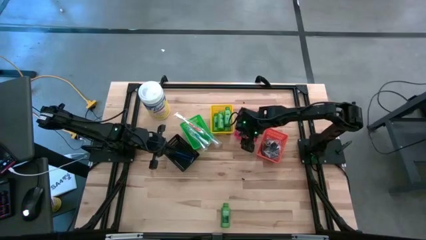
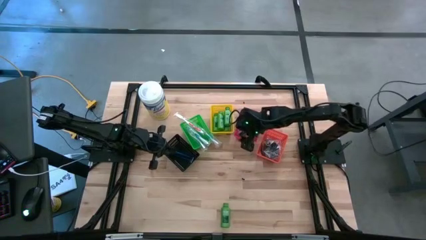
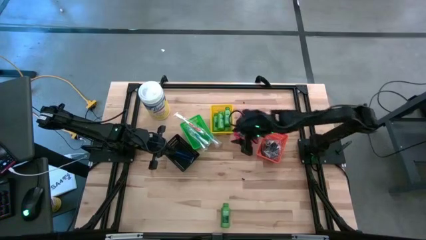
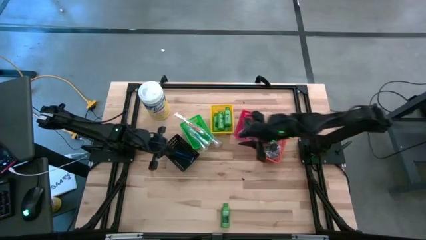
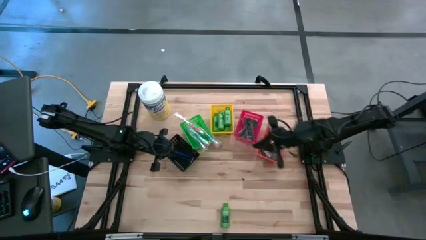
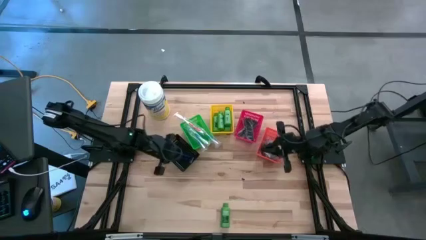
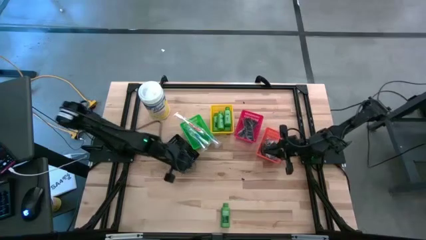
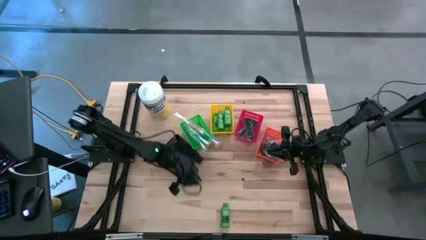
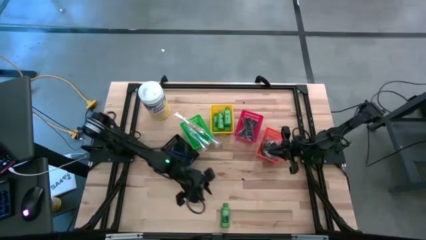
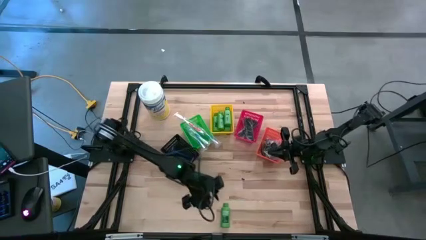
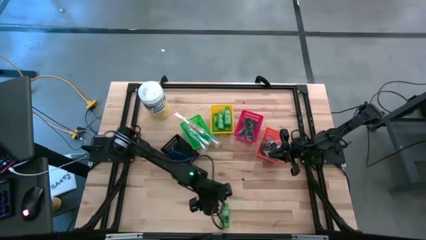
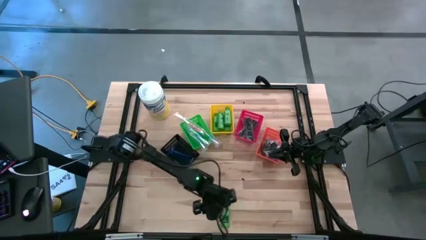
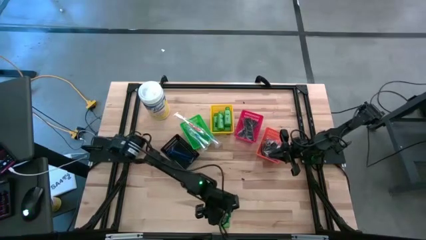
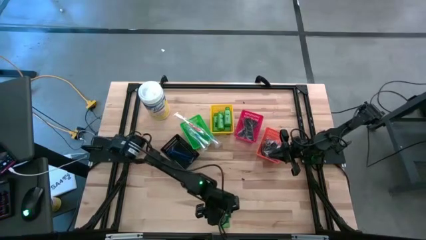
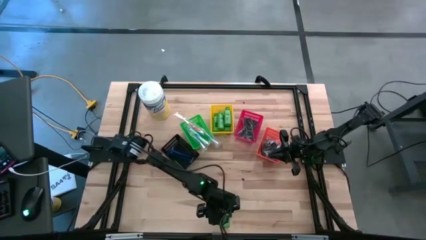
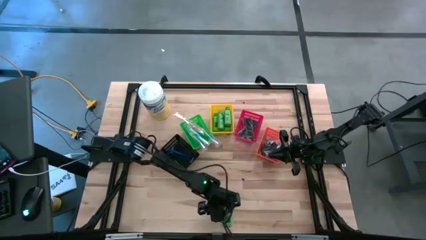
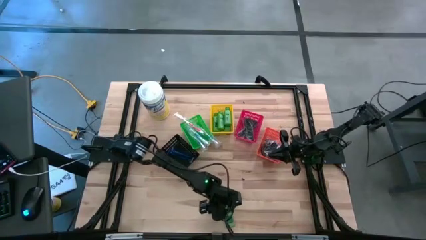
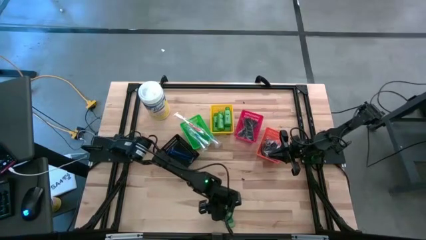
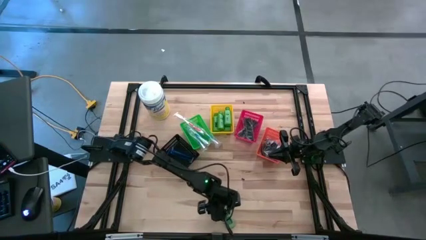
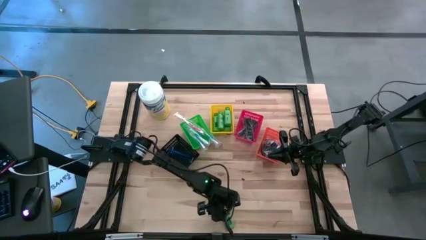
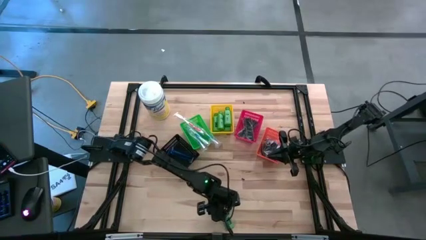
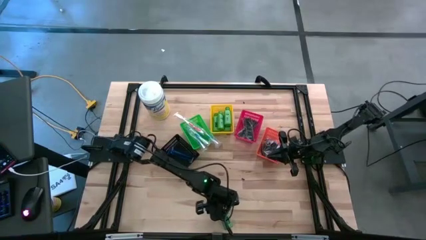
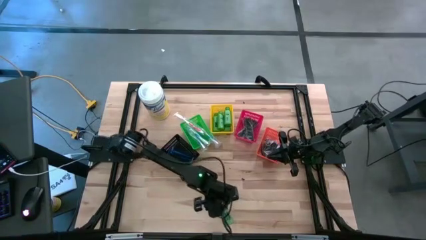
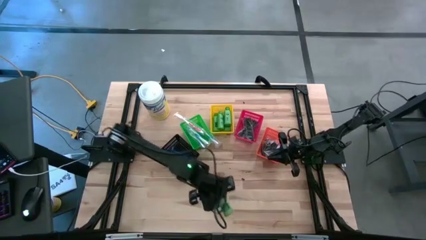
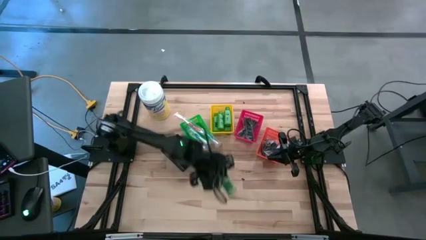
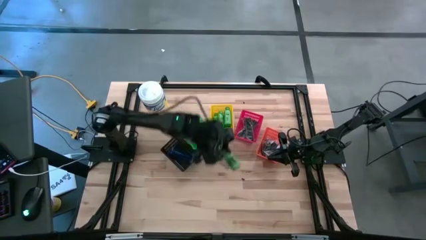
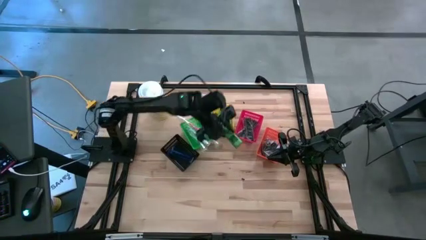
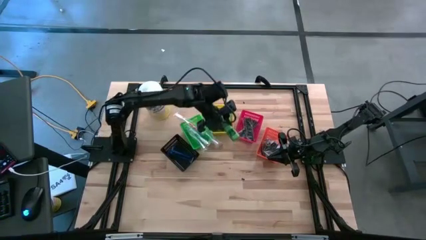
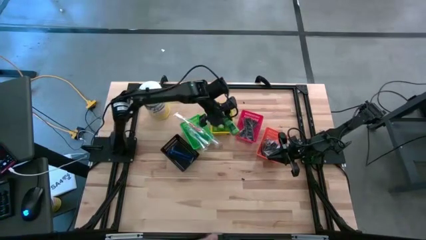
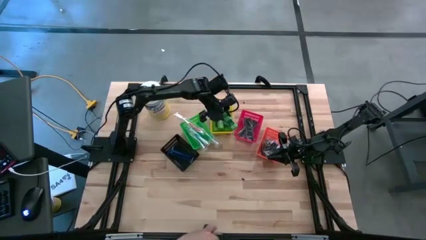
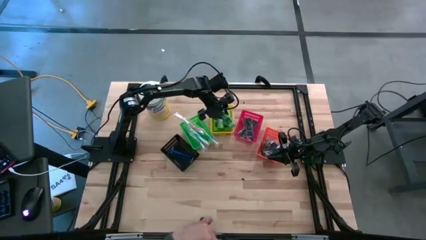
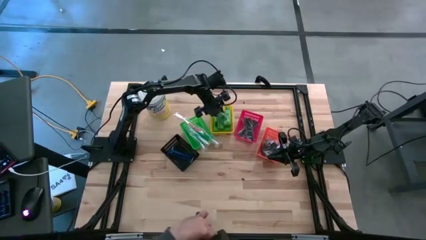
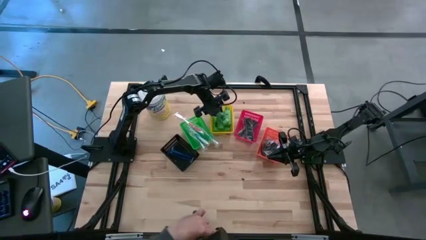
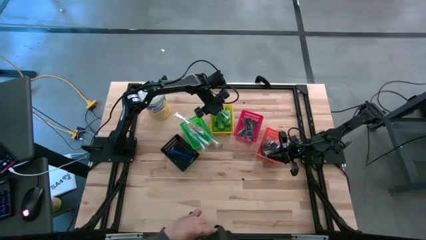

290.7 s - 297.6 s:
Task: Pick & Place Travel size toiletries
Put the green shampoo into the yellow bin

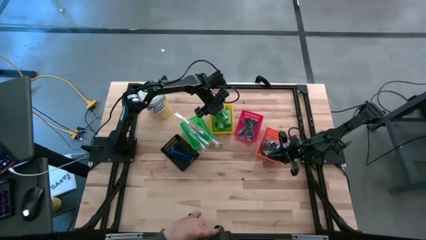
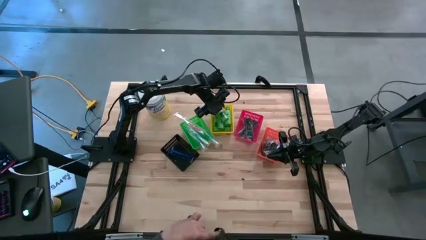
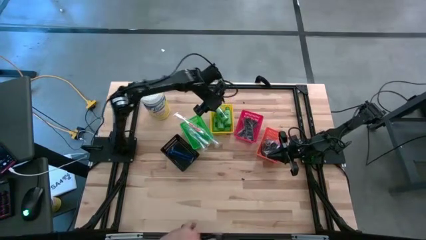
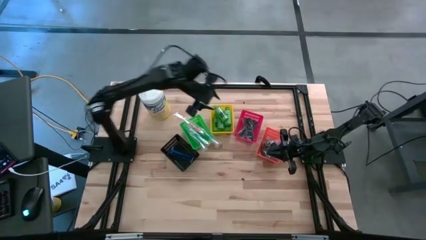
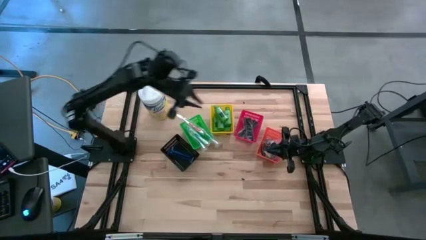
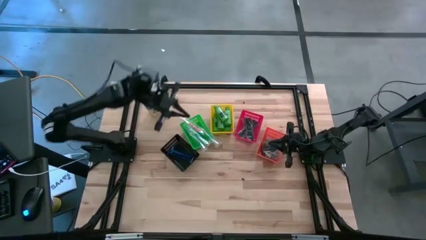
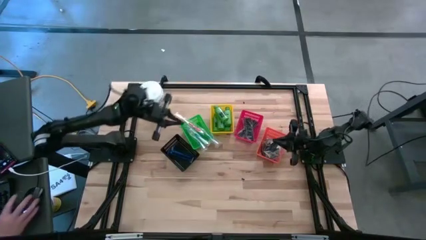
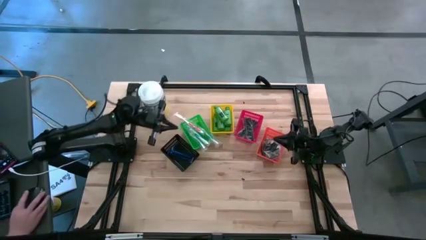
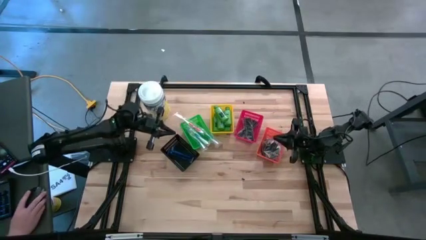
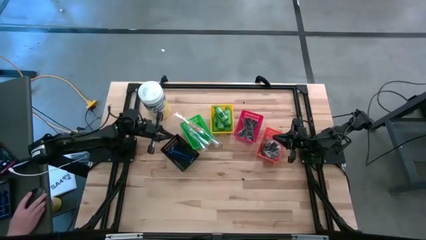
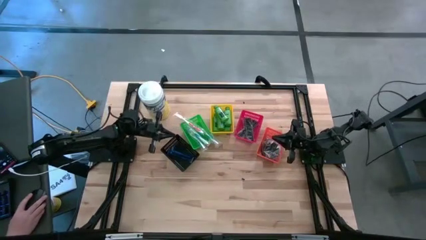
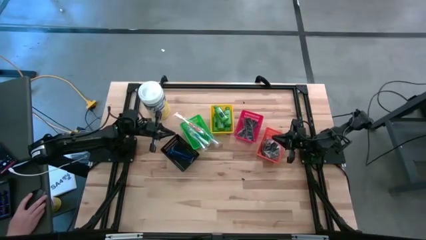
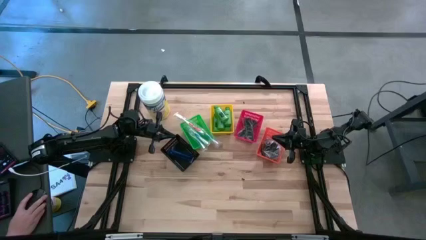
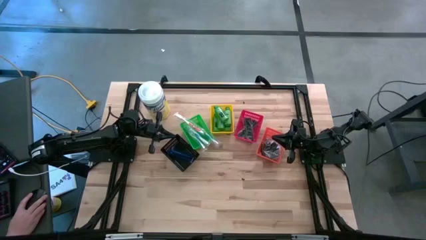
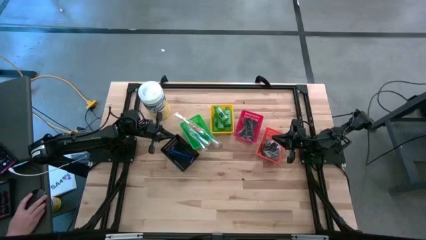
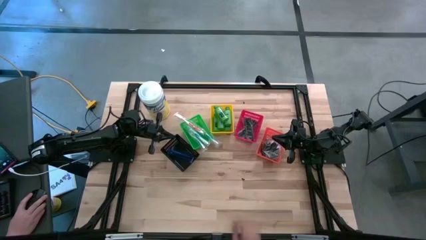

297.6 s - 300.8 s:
Return to Home Position

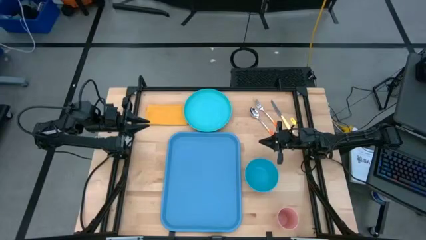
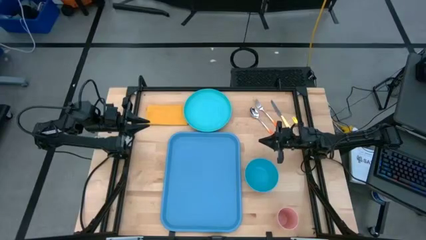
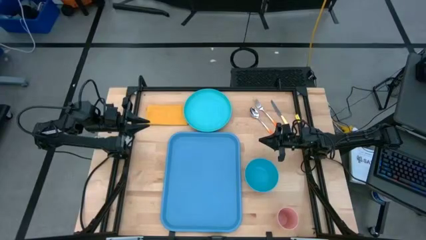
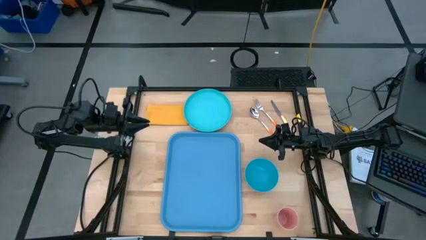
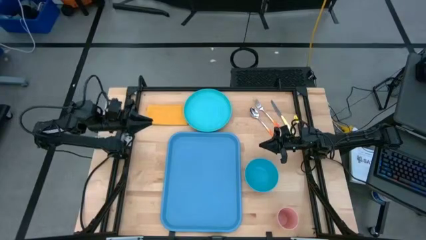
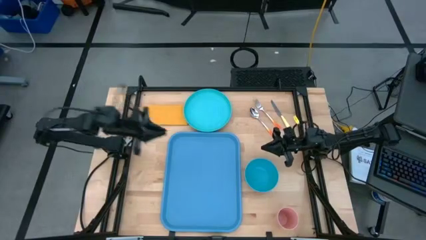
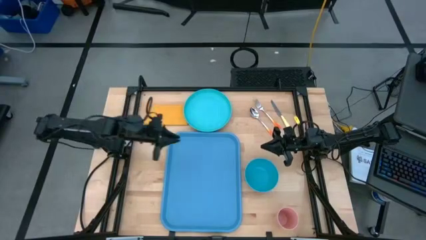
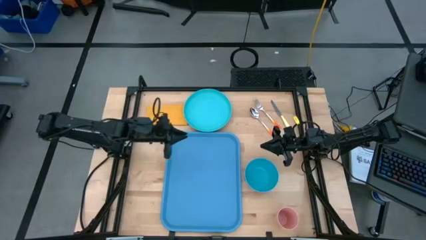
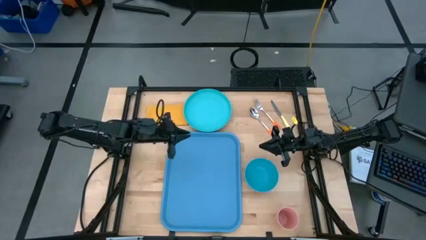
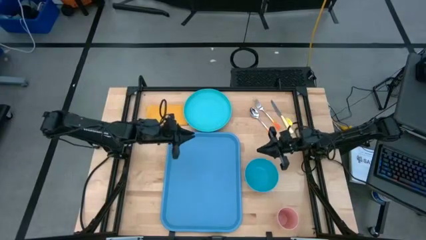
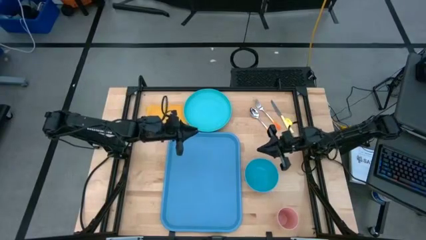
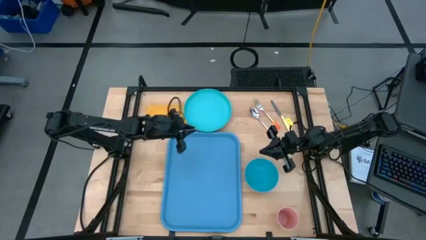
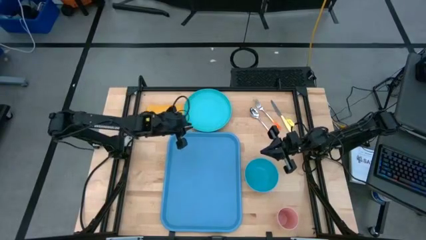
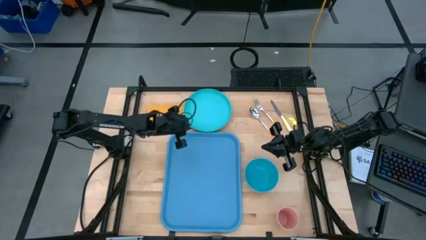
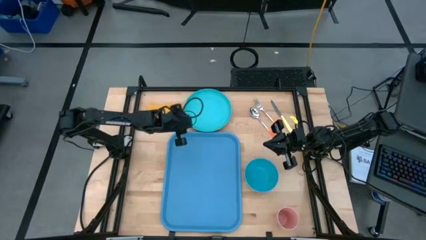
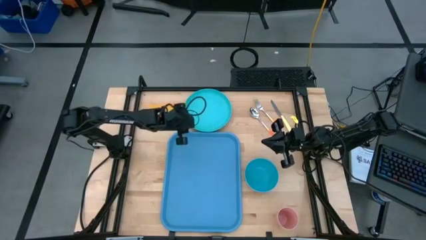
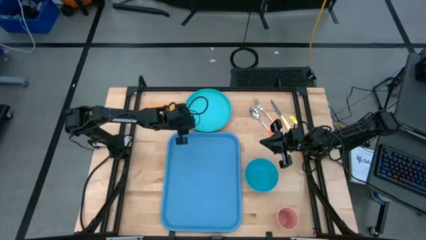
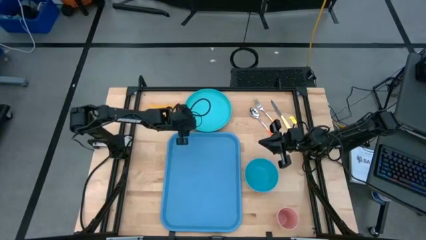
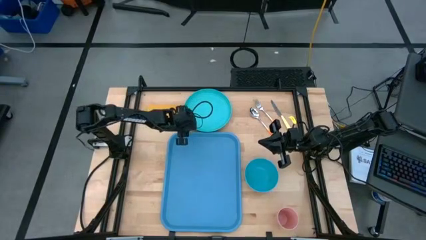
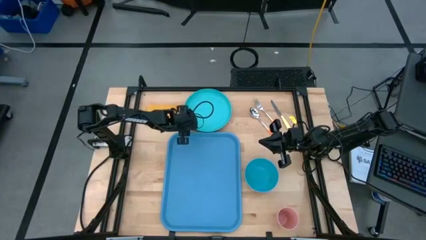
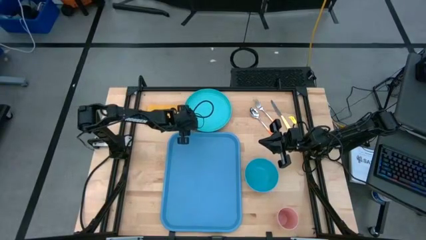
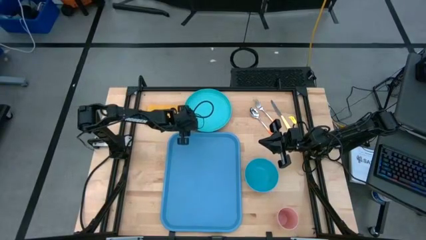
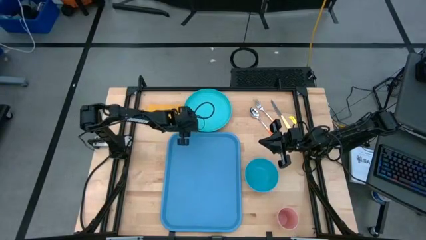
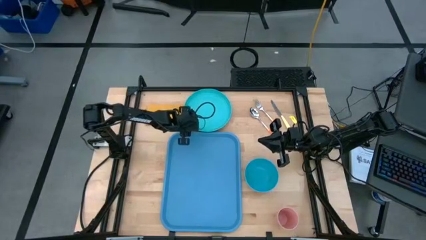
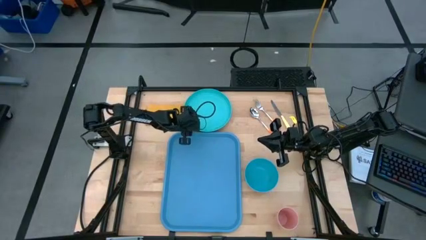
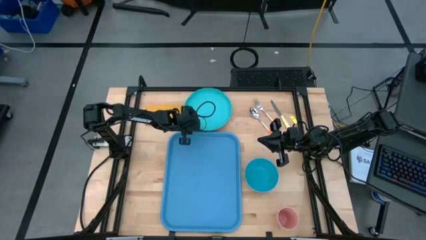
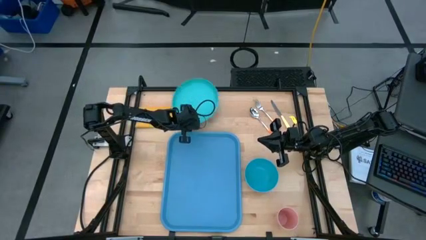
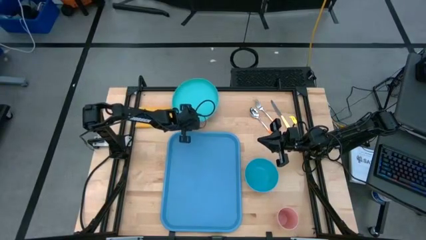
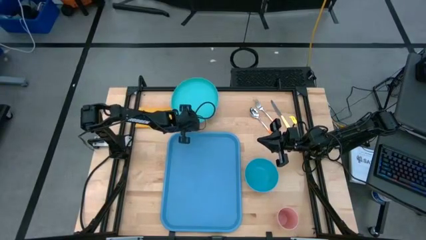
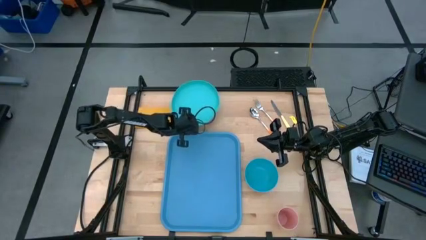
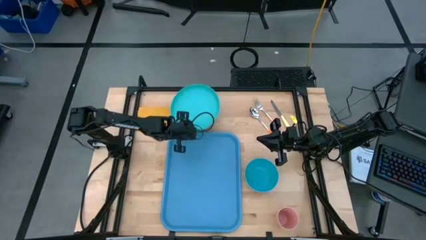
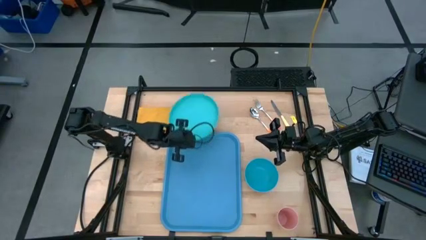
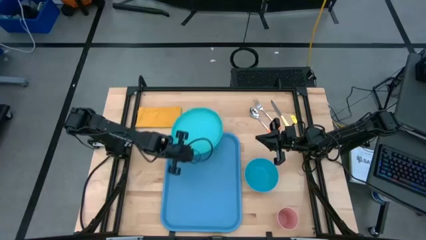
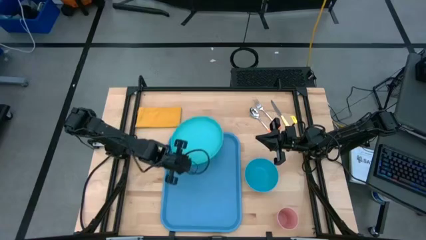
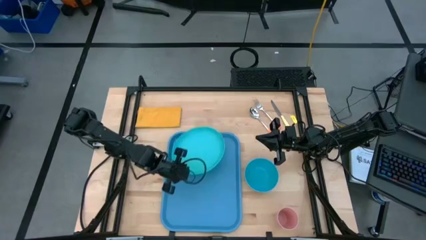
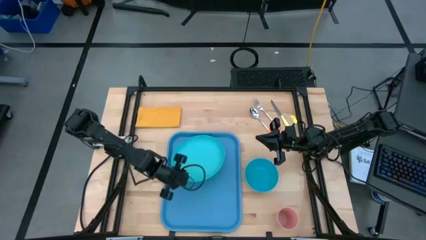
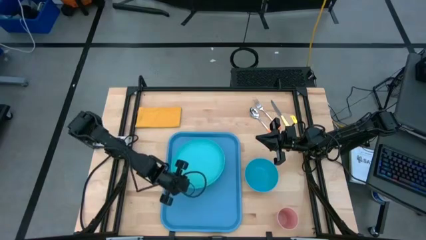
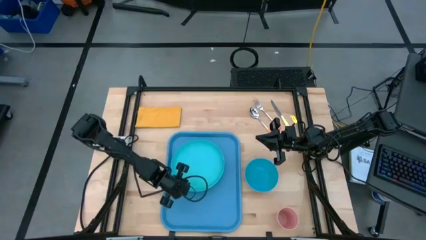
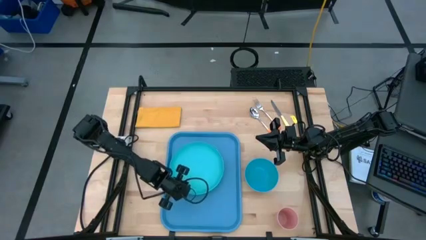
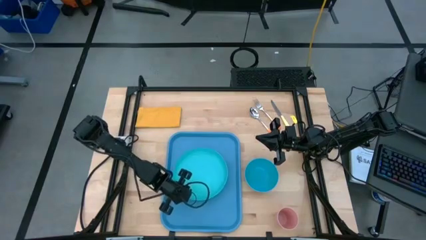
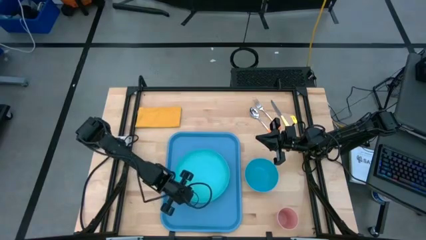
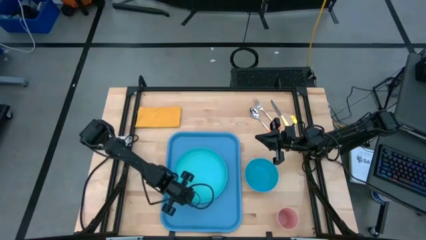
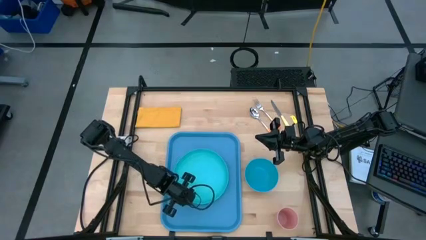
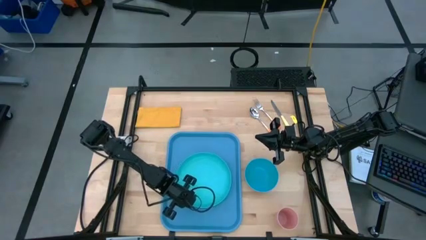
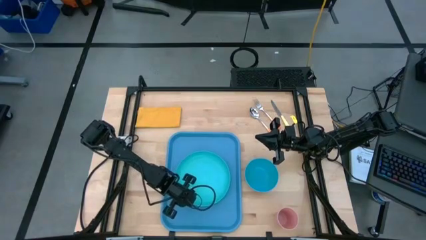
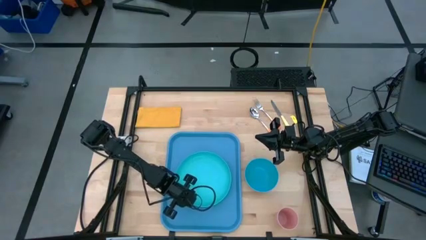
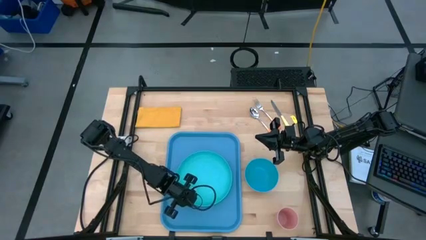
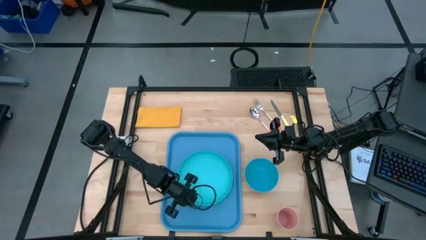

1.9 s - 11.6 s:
Task: Set up tray
Put the light blue plate on the blue tray
